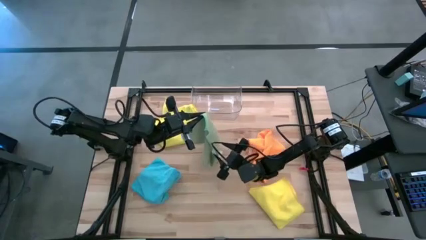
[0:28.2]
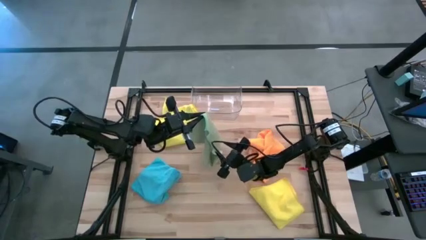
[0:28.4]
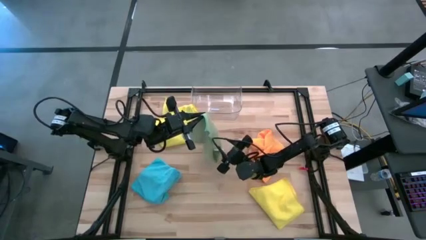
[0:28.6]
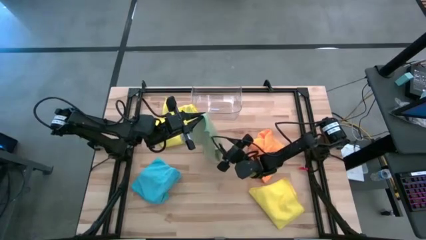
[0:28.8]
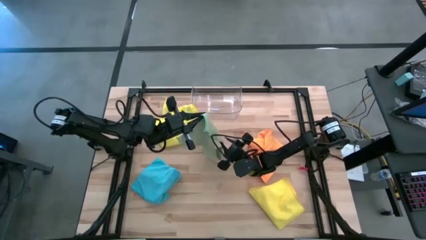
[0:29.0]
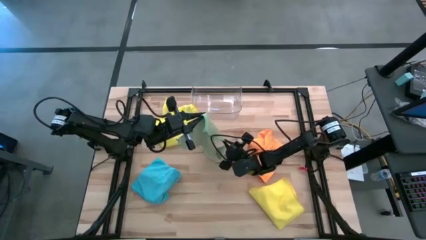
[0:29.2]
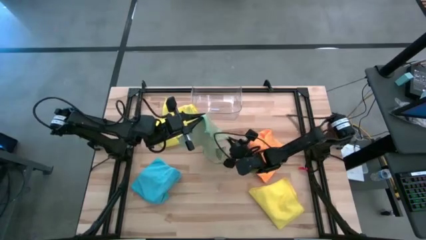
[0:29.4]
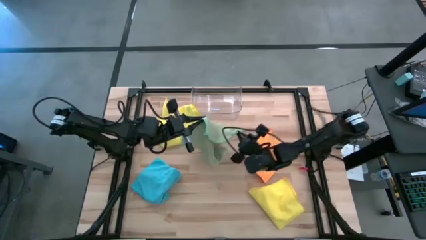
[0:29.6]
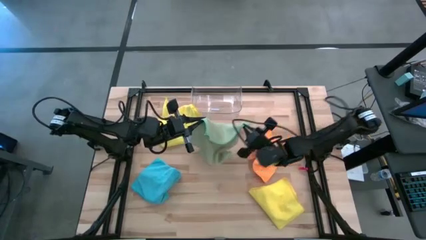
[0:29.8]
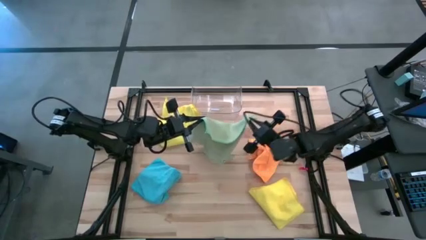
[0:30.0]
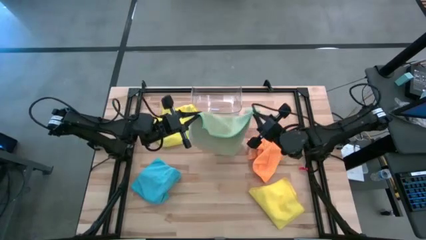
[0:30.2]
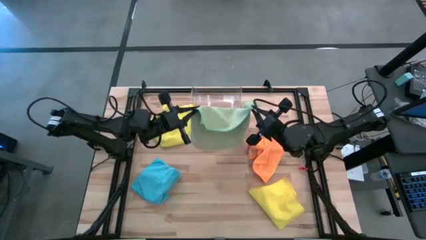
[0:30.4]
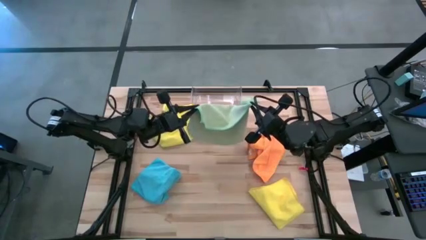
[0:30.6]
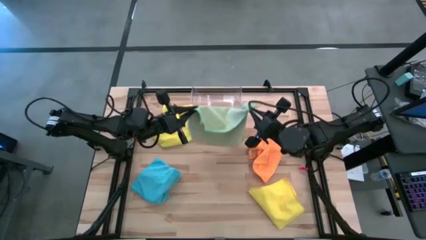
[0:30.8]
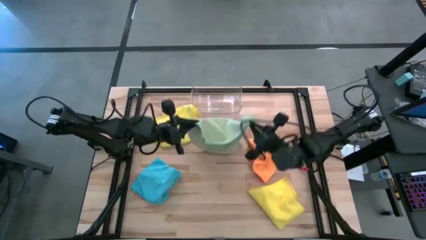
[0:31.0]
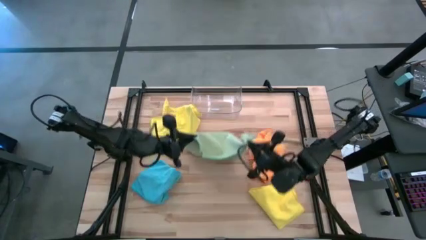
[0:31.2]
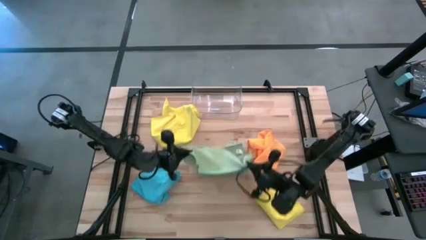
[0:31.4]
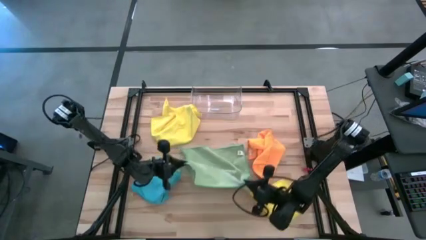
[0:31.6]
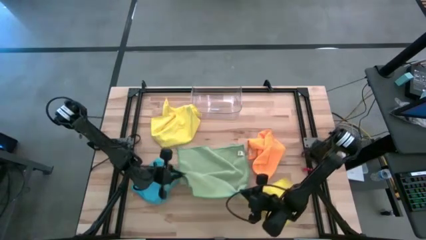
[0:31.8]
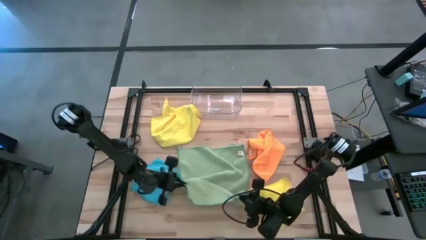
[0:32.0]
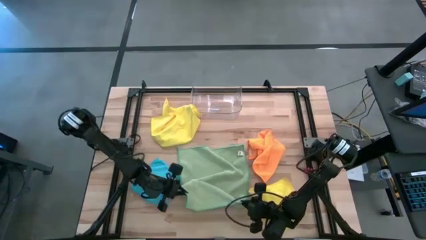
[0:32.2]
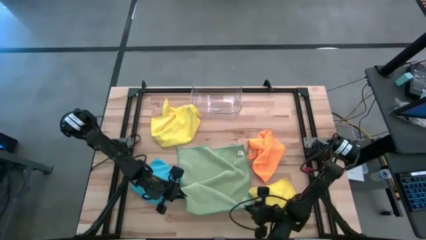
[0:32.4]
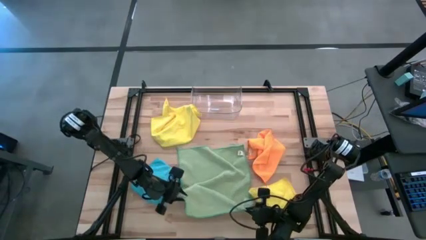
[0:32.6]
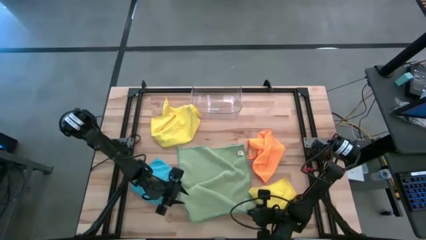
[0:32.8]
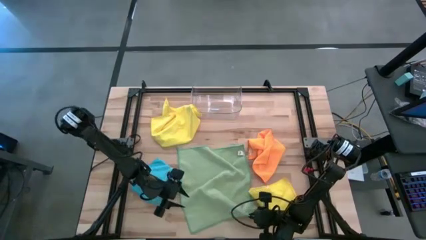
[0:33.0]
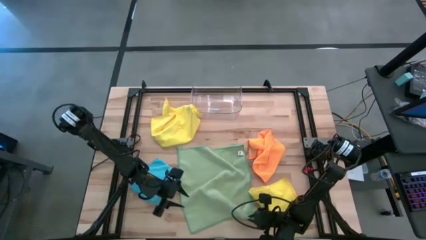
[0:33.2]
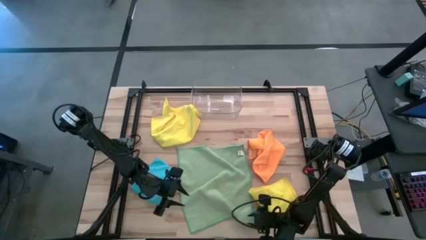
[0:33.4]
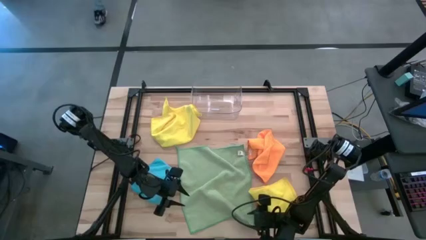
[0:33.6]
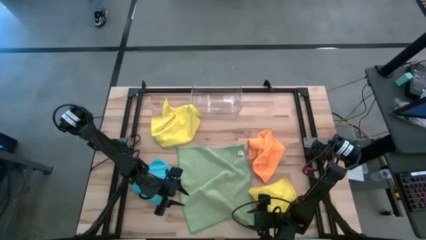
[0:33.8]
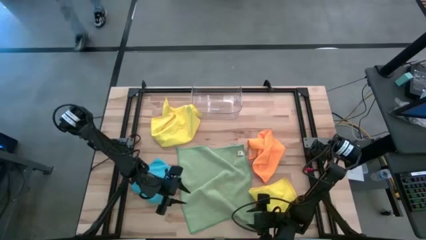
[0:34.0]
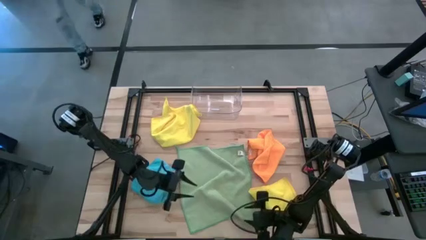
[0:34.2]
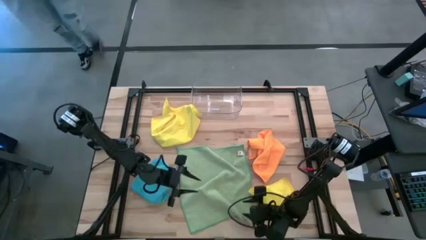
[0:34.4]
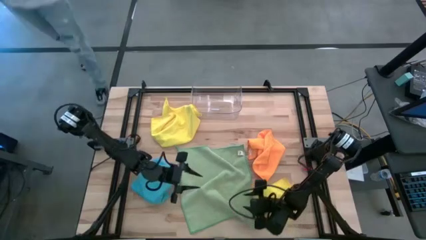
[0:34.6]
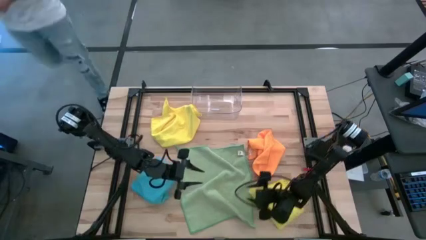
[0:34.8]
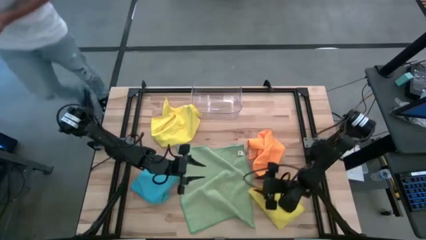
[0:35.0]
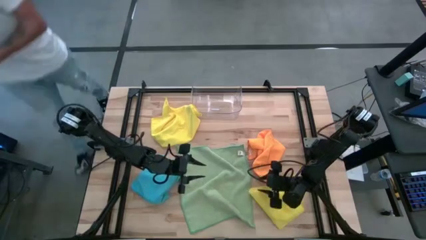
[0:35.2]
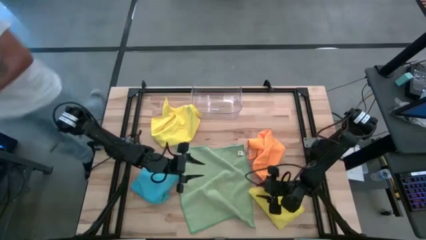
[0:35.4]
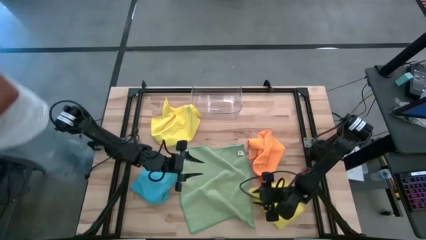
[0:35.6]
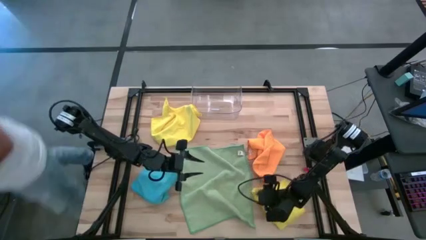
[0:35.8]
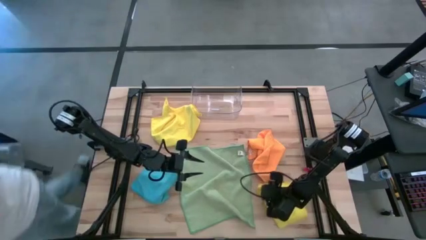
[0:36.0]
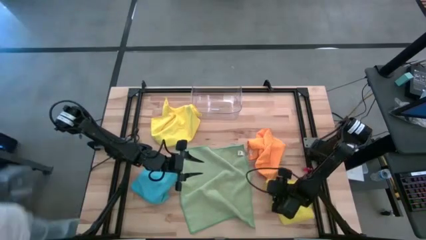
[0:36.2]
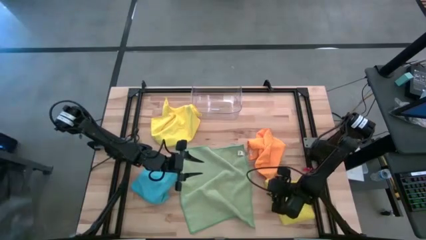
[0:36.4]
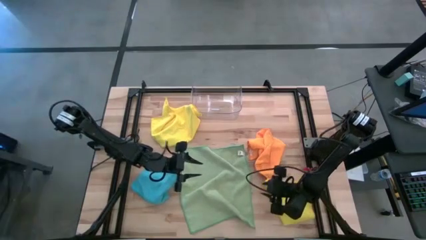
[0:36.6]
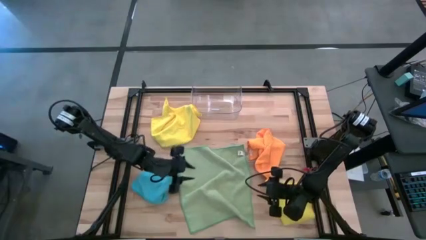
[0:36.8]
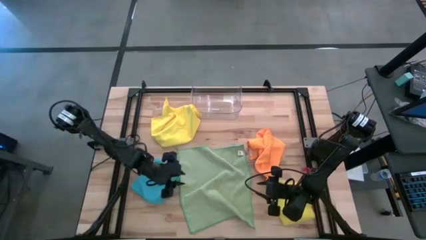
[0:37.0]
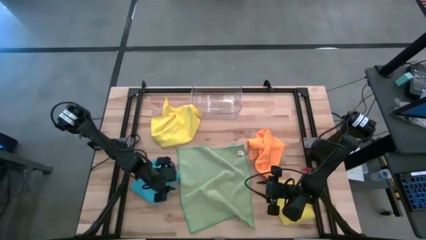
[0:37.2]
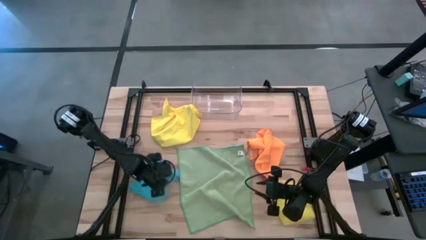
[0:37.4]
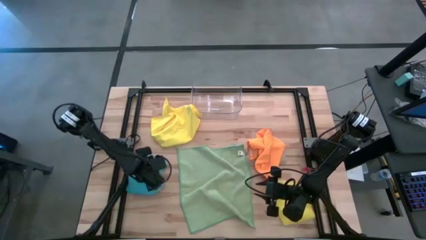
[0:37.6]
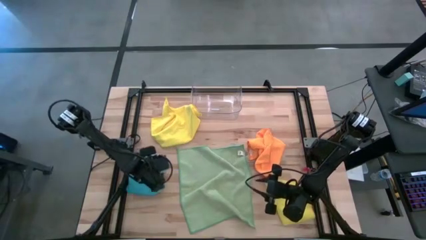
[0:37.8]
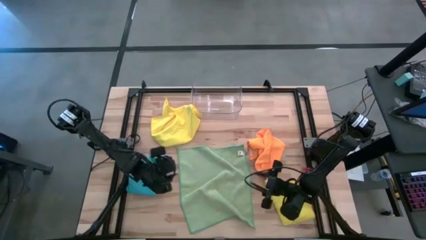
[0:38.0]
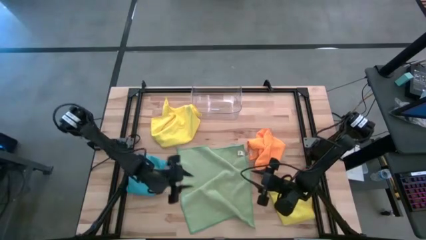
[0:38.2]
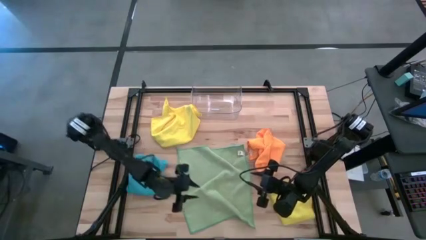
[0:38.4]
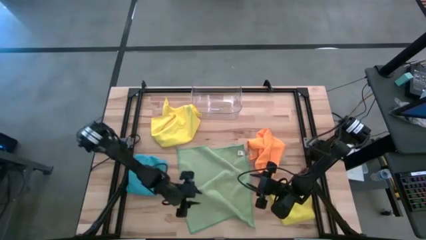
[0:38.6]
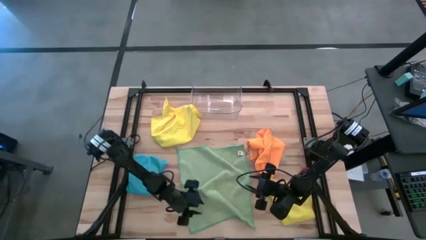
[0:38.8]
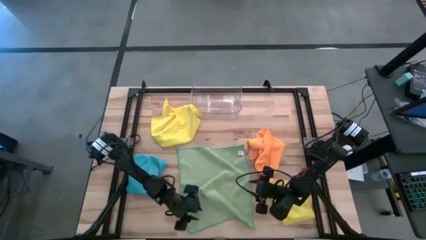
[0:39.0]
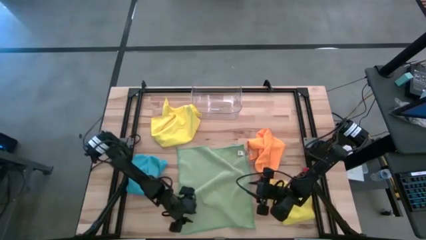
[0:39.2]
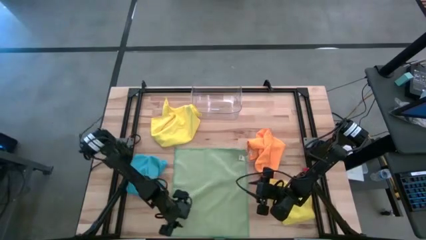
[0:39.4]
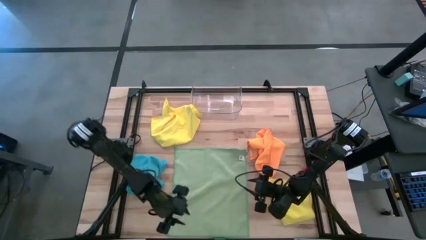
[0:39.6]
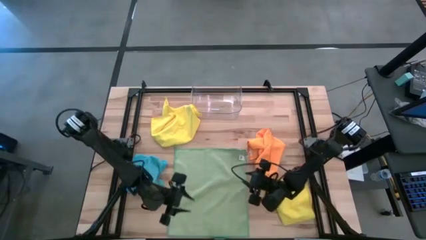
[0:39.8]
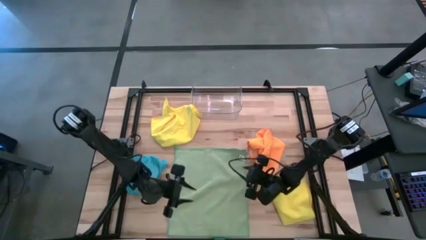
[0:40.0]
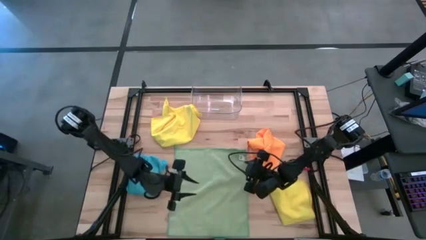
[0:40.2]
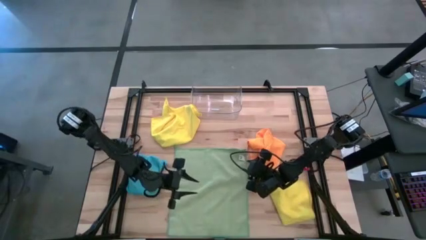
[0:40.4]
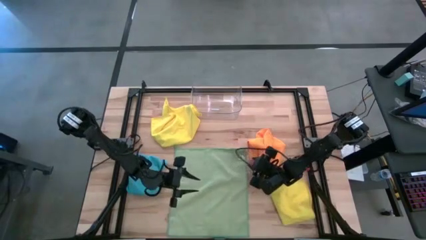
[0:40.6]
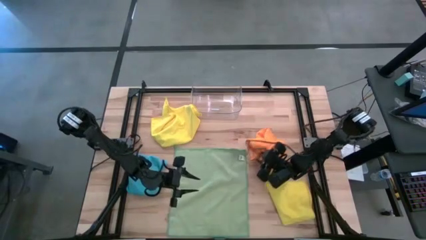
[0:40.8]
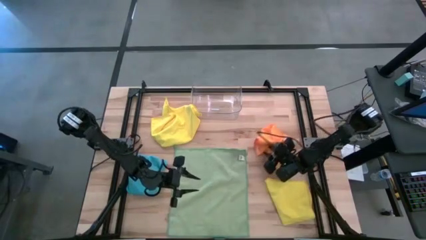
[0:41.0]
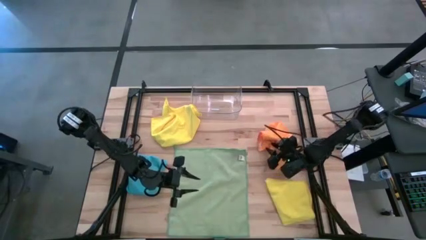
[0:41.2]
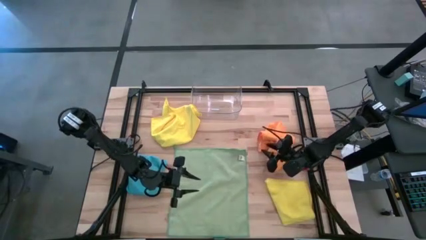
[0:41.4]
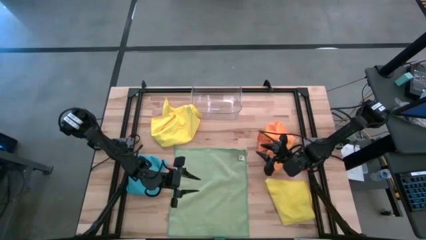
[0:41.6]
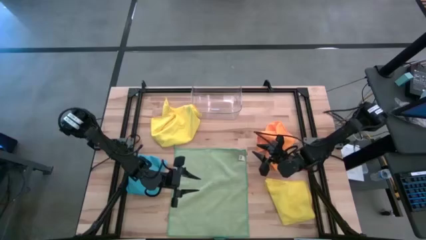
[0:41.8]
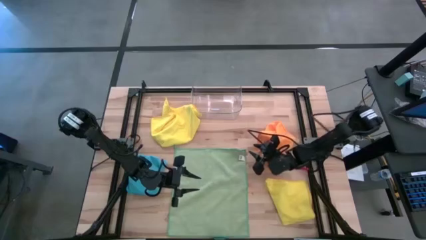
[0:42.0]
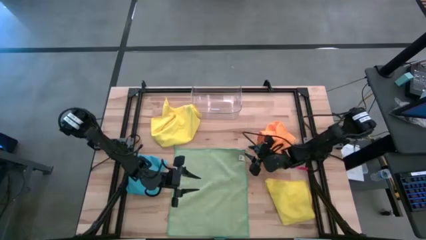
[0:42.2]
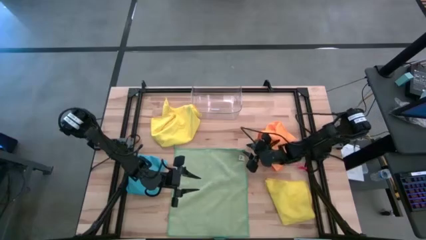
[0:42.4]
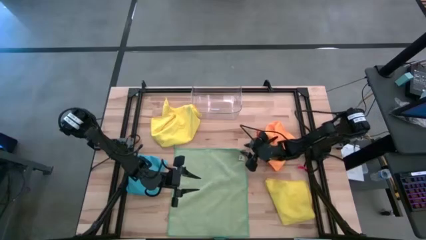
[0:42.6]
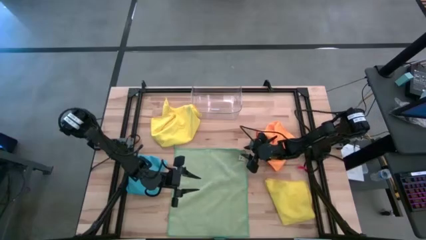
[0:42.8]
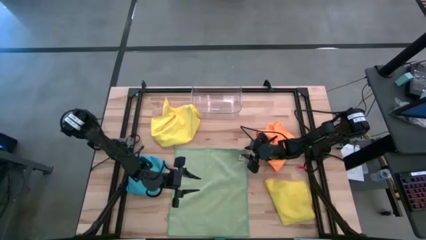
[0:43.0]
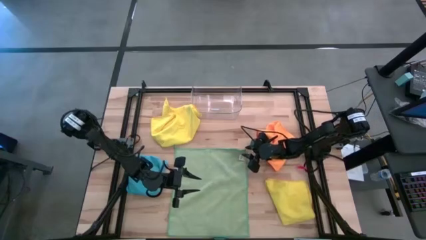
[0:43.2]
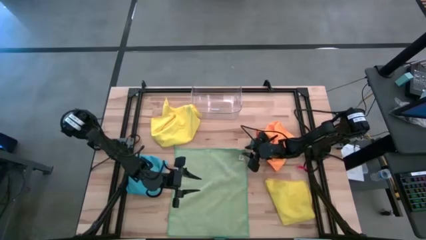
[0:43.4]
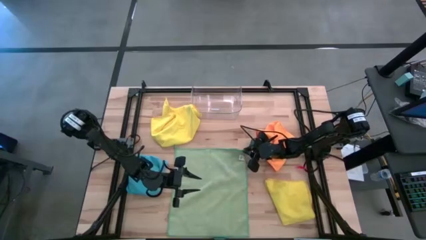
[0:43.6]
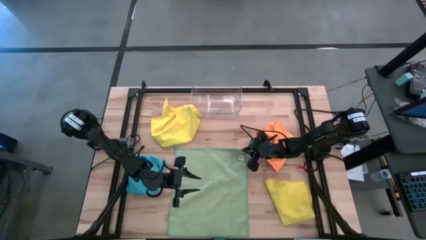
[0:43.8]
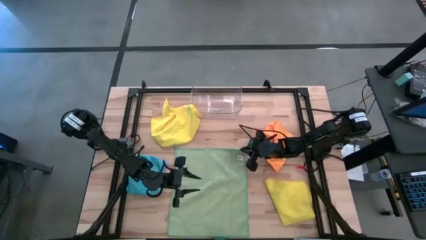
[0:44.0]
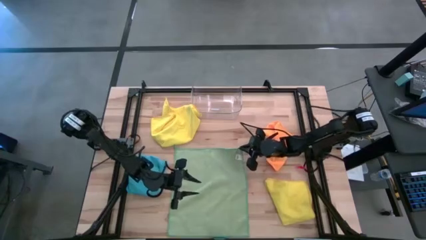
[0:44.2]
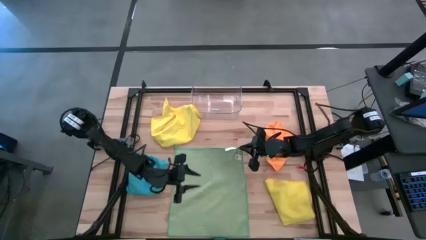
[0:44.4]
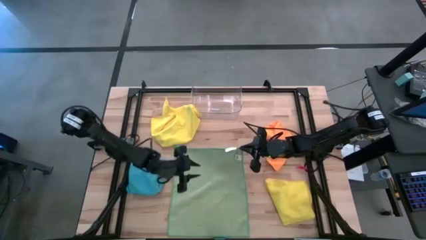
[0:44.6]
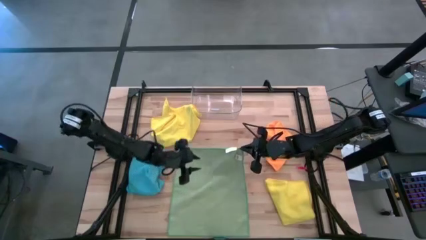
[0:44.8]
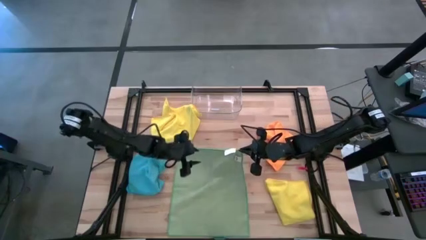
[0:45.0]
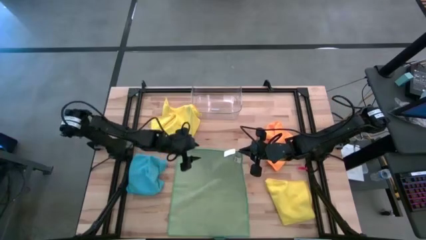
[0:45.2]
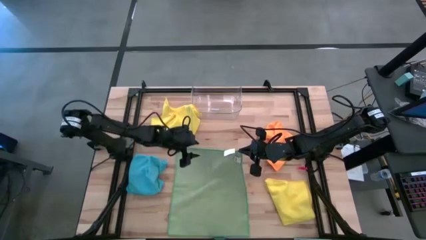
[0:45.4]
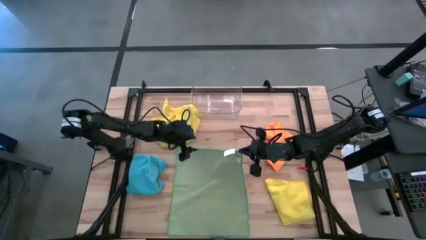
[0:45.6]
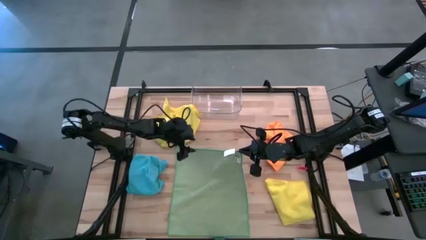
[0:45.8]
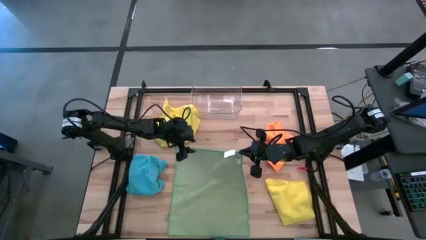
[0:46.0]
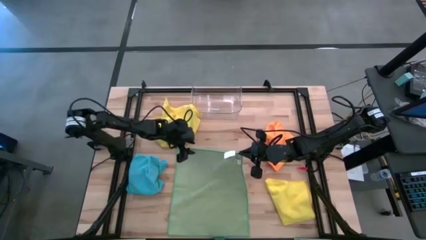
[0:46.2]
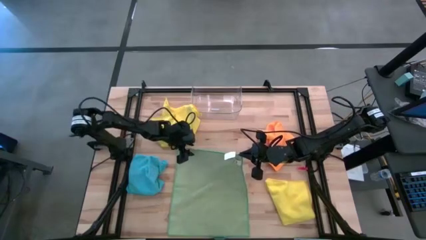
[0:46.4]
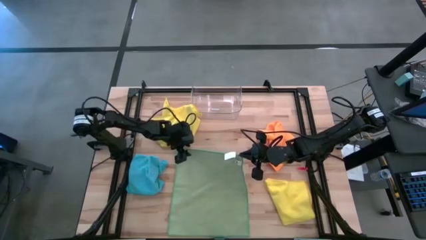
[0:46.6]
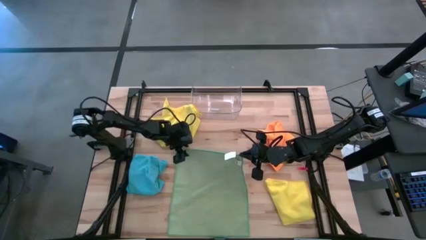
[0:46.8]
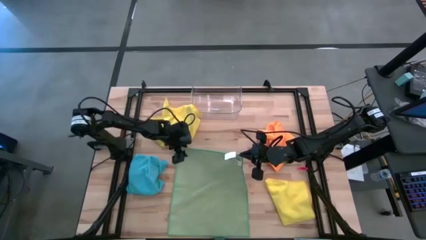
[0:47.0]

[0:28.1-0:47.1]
Task: Fold microfiber towels
Fold the light green microfiber cloth
